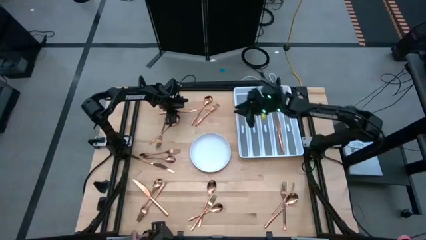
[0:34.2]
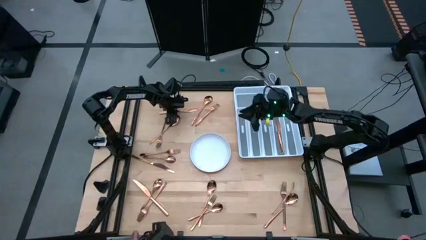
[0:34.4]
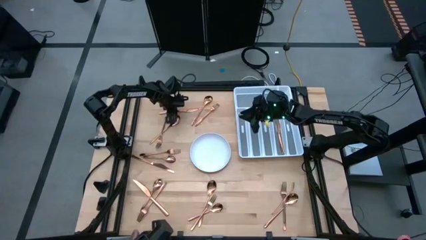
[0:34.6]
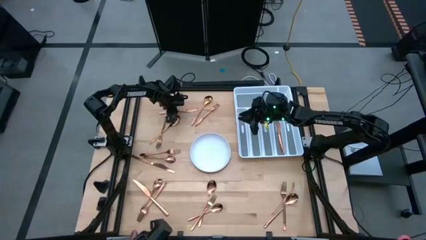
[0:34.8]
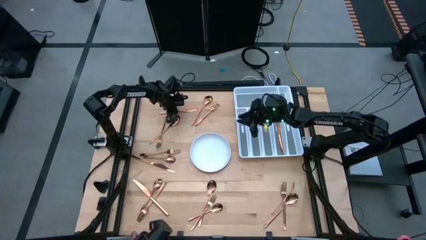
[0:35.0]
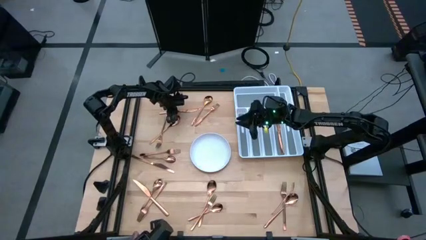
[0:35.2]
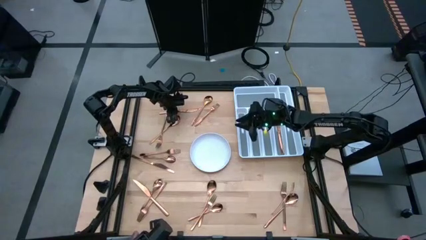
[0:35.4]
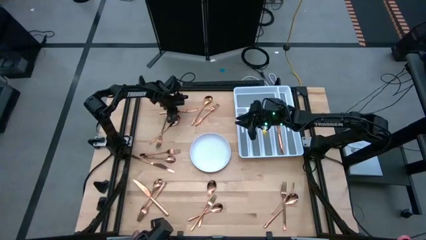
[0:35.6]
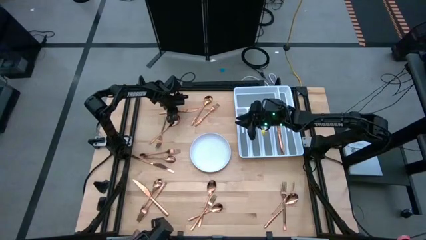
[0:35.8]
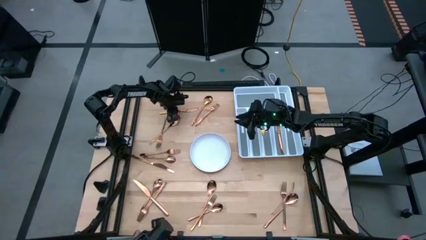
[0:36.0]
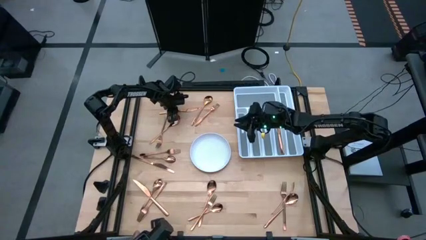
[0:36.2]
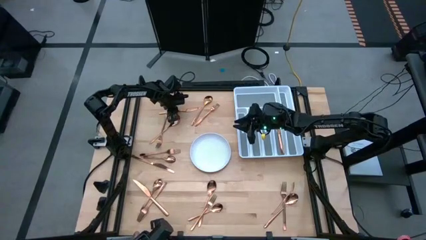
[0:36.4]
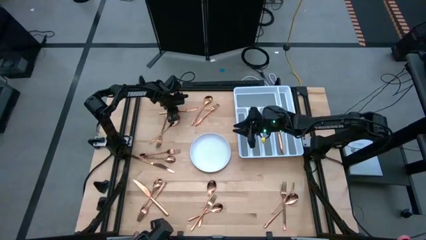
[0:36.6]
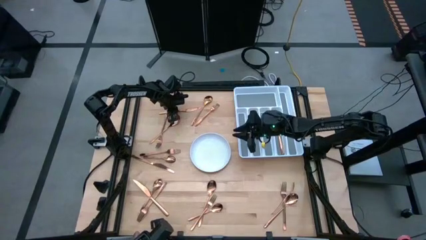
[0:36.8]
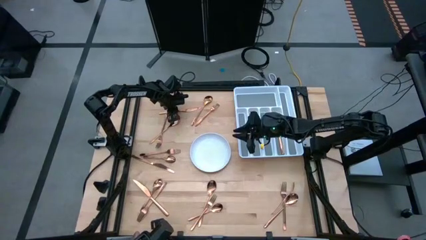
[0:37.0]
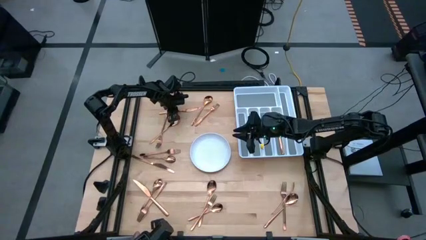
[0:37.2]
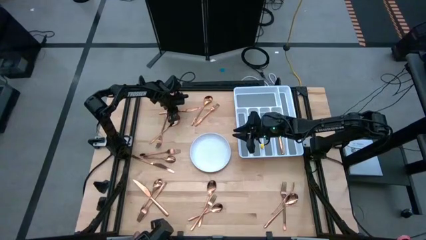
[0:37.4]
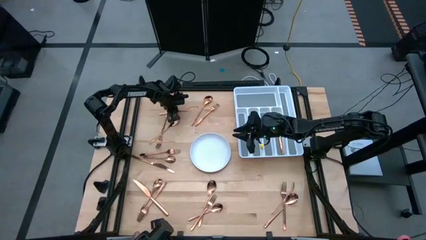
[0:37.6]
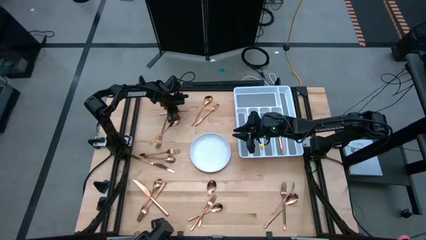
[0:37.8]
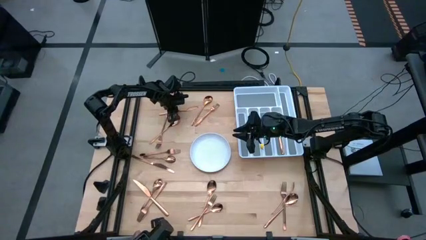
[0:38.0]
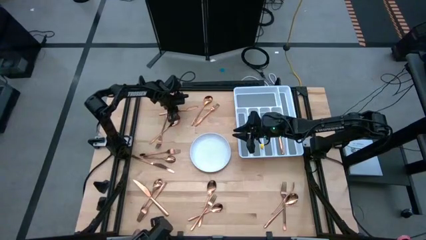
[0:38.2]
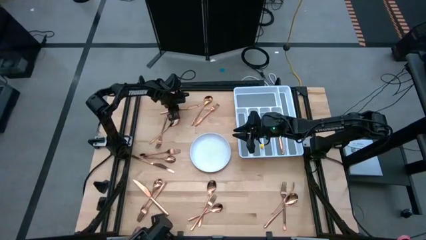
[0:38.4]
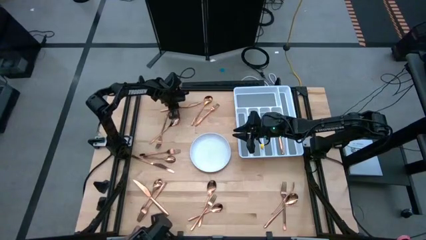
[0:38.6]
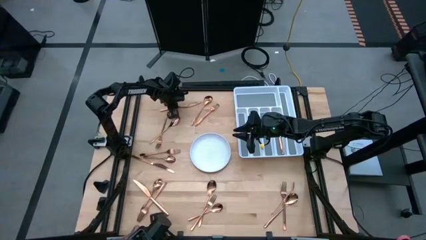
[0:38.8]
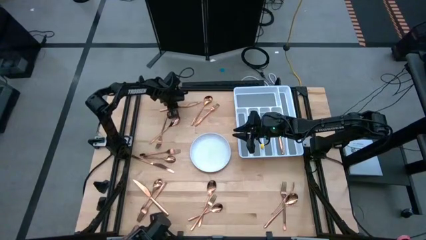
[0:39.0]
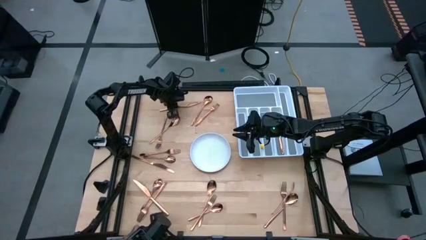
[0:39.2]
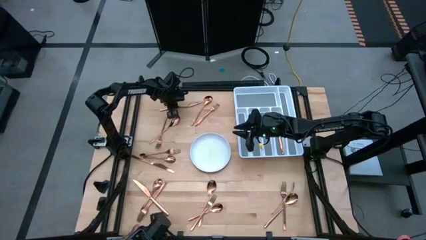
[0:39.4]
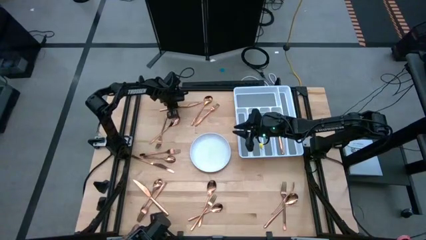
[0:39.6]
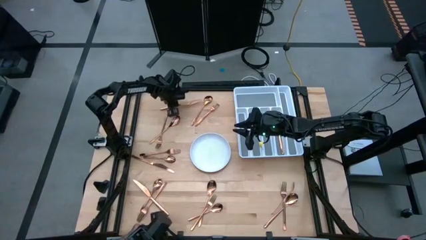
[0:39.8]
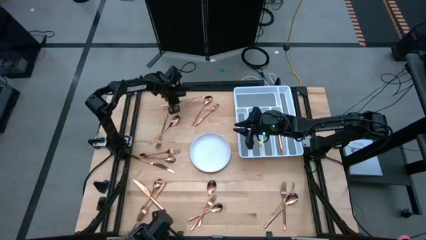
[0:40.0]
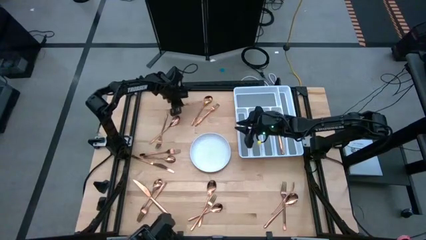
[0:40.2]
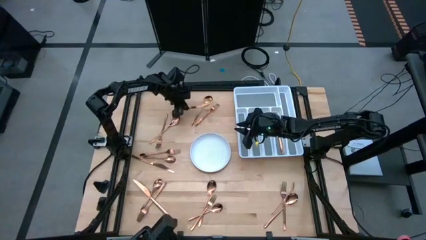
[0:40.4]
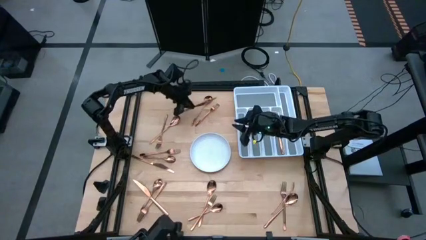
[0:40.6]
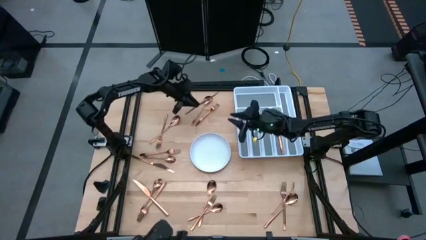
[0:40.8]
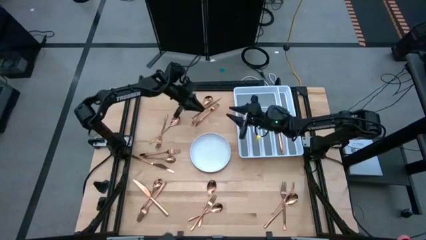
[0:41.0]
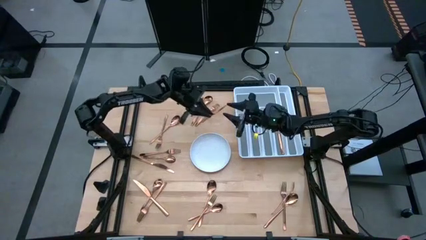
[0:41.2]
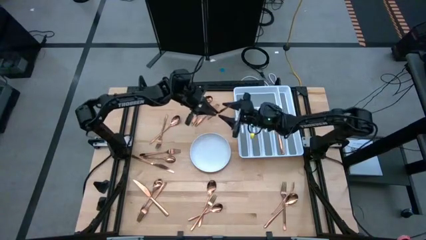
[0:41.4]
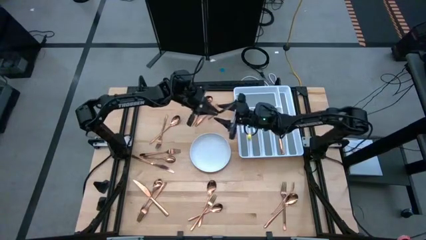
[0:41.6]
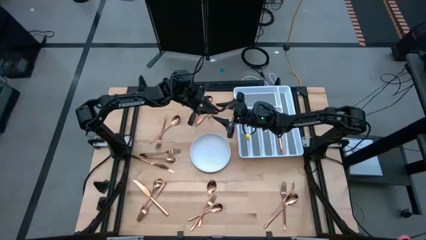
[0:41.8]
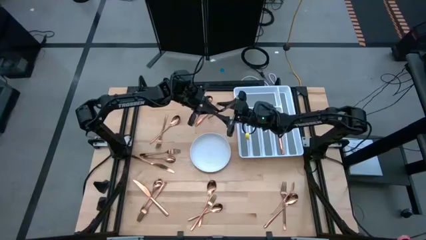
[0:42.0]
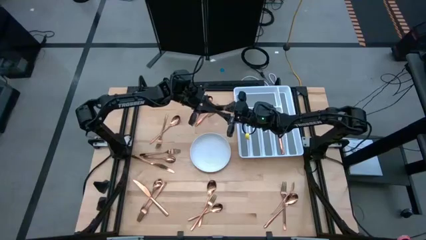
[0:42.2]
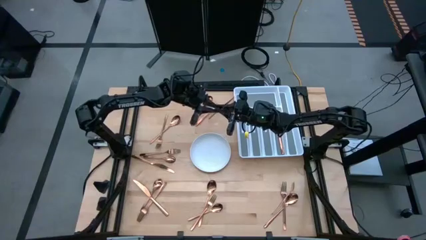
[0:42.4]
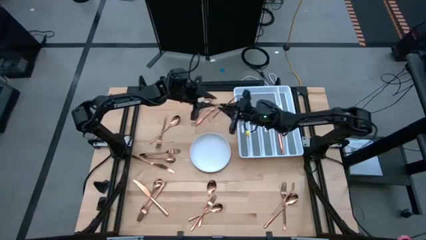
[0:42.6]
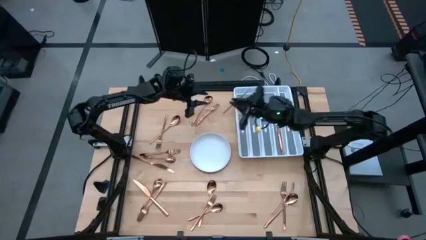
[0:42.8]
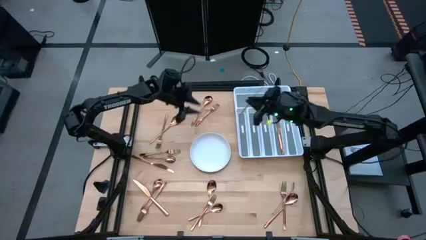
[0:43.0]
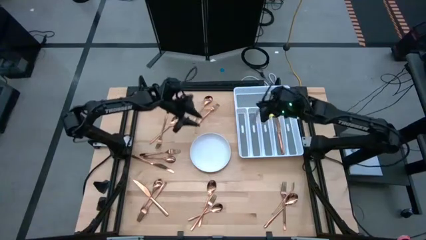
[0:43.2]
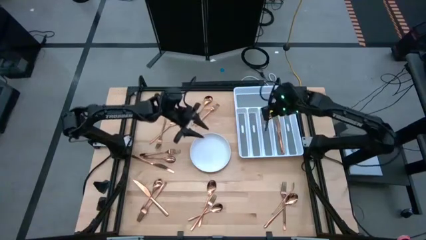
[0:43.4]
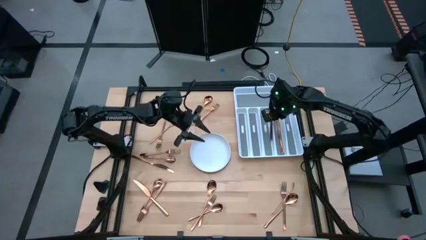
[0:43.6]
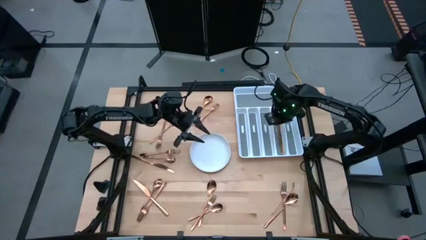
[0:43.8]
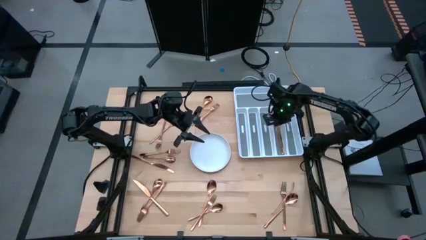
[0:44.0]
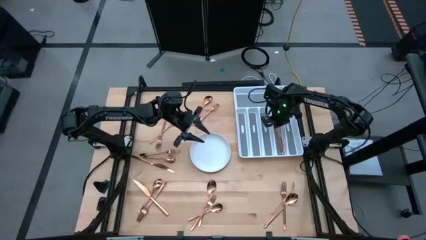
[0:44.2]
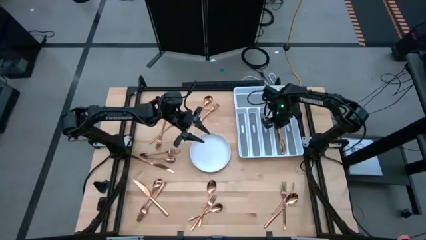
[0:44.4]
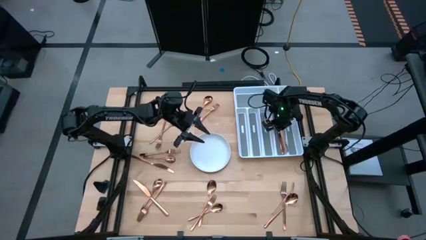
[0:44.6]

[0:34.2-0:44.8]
Task: Sort silverware
Put the knife in the silverware tray

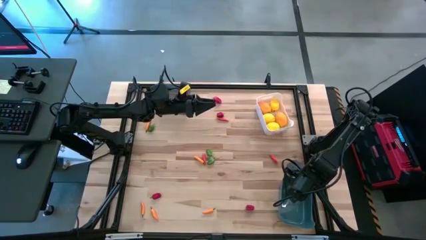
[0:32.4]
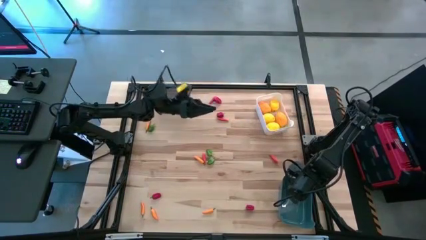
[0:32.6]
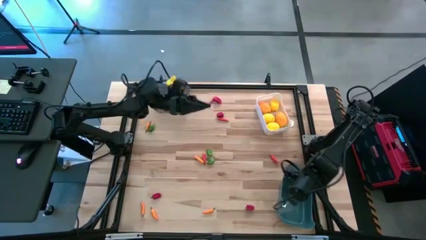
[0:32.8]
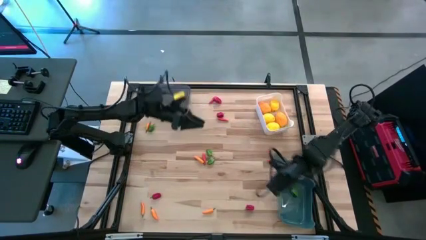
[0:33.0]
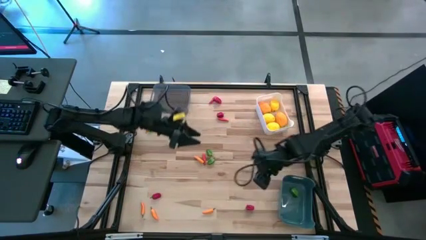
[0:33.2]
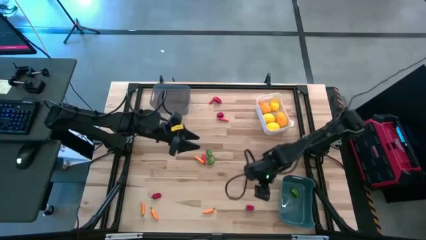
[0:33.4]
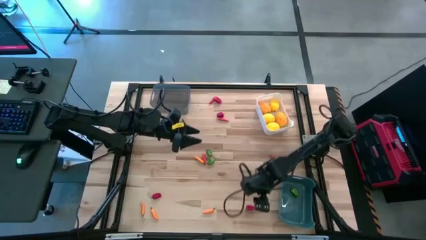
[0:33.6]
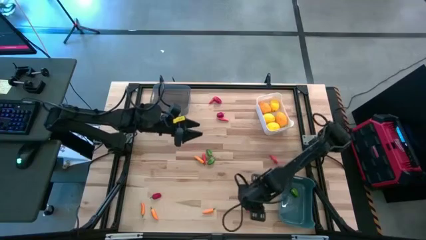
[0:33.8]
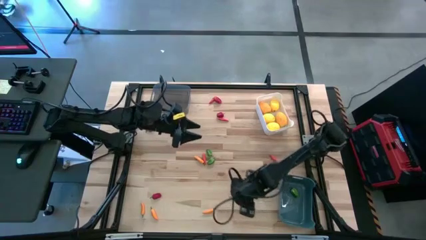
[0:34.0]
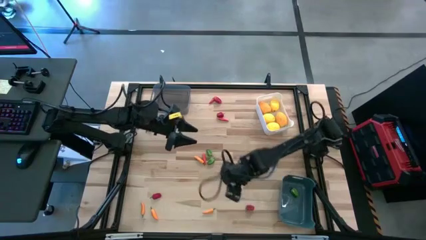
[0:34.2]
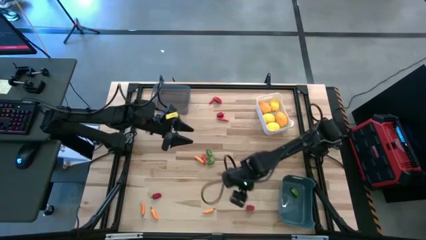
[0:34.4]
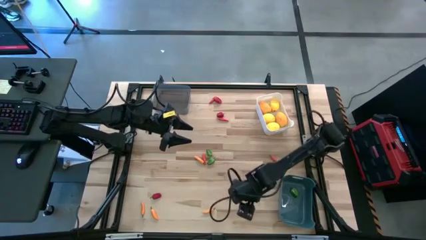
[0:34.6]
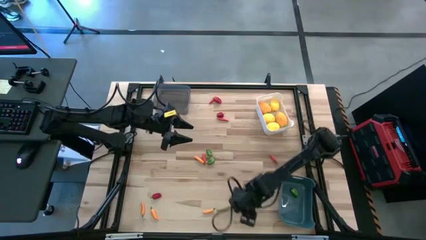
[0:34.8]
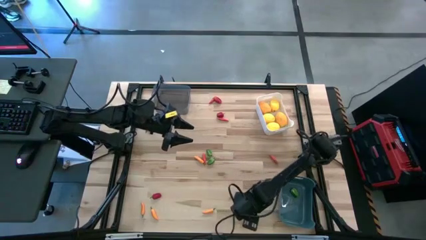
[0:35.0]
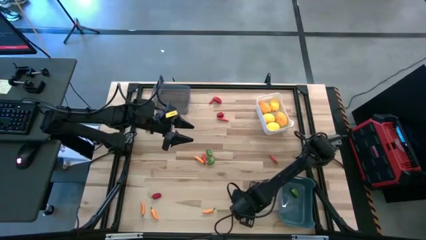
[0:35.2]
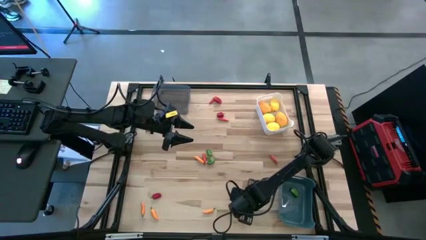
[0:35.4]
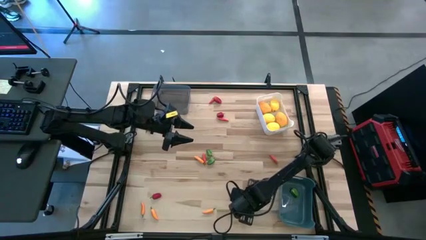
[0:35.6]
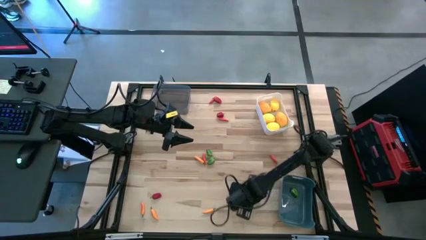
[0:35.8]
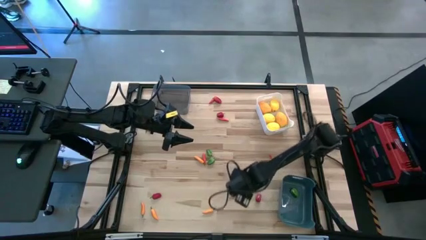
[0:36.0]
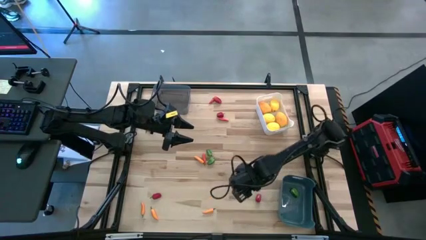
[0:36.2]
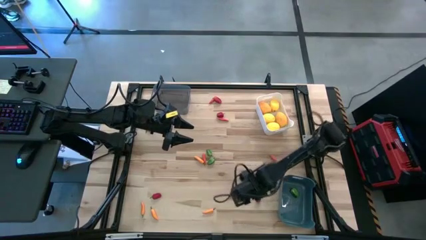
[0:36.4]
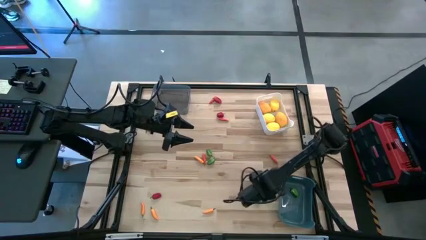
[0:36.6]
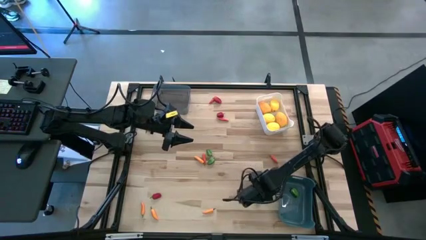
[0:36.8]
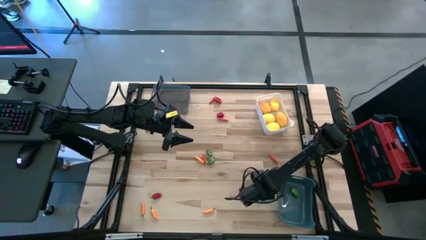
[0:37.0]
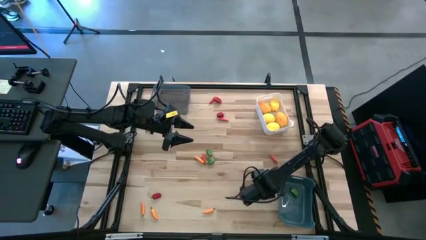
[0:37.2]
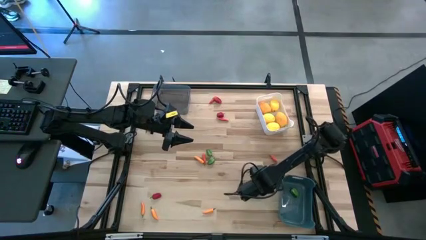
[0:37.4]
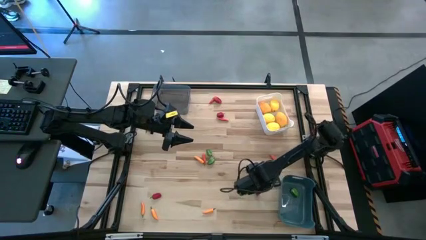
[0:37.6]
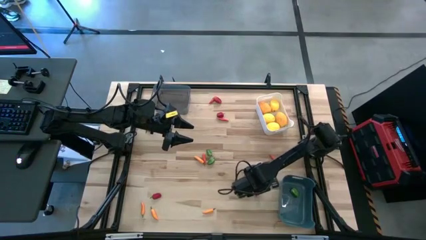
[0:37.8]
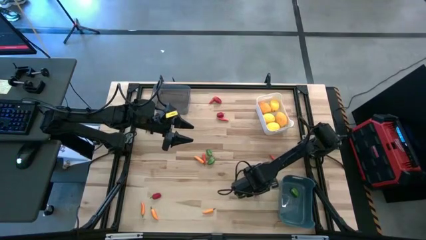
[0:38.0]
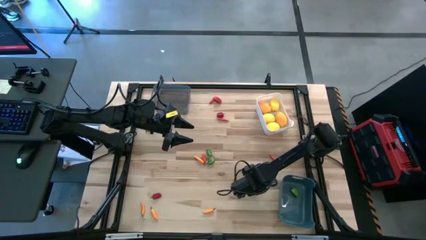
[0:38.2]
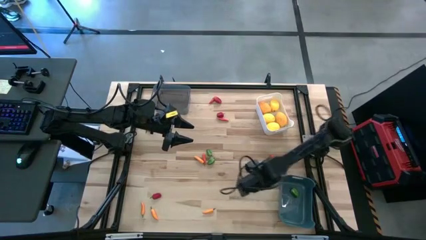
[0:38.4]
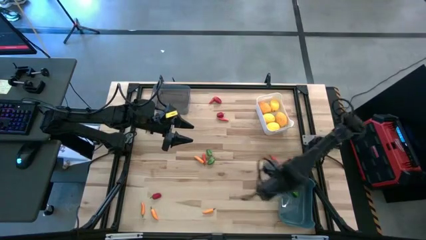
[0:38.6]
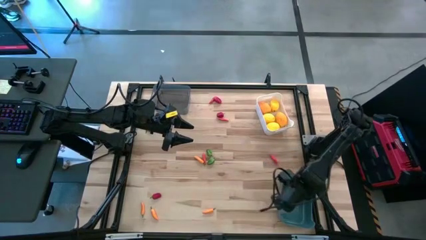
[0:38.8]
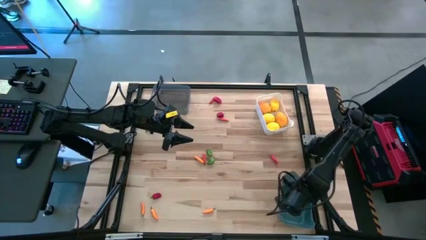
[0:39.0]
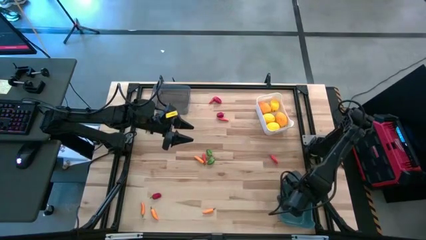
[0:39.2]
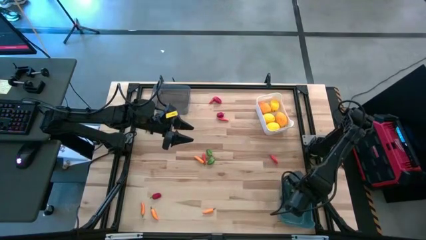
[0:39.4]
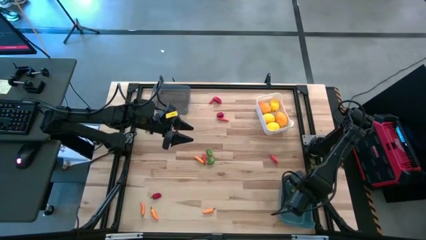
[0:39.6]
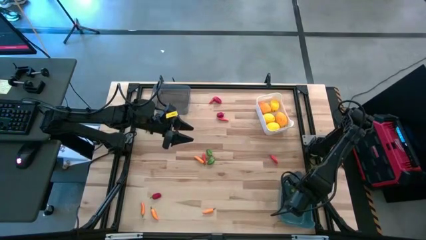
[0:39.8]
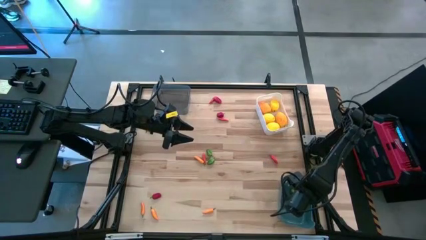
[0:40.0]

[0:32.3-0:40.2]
Task: Sort produce into baskets
Put the red chili pepper into the blue bin
